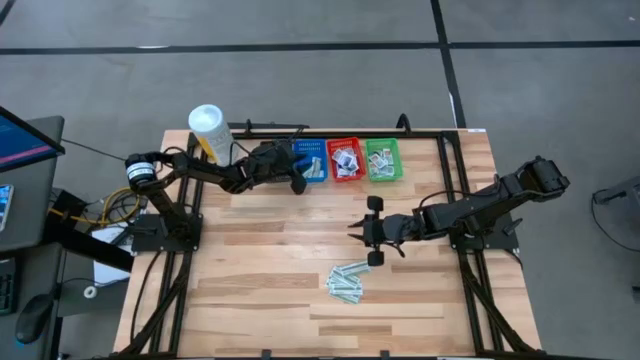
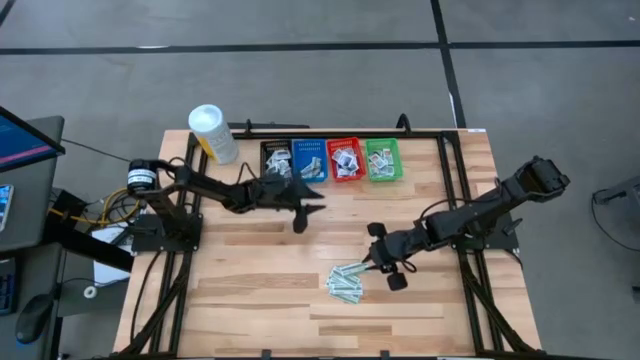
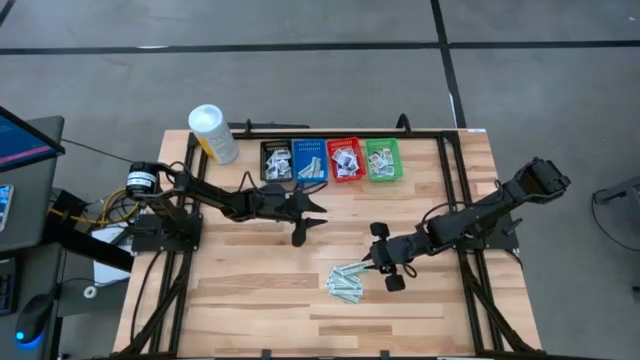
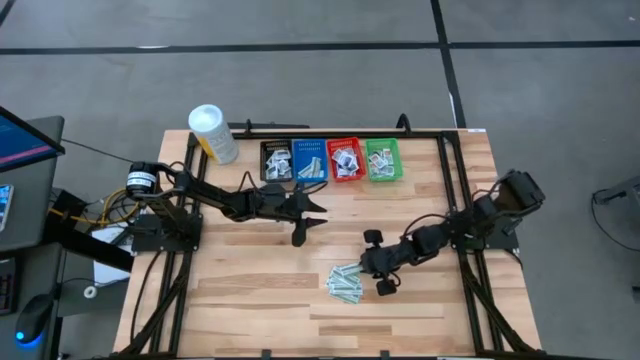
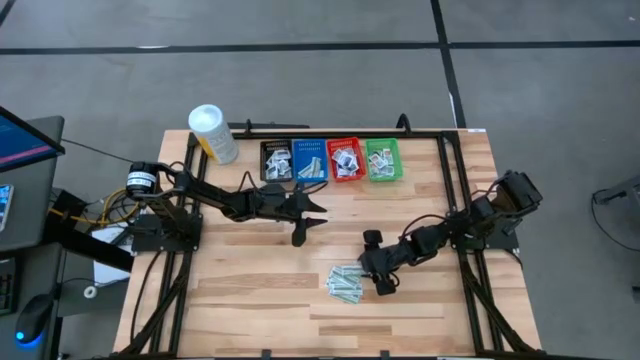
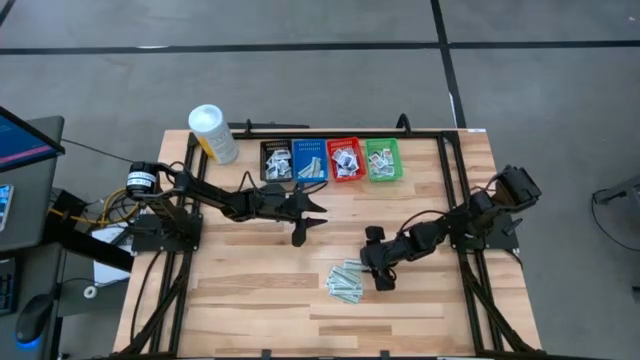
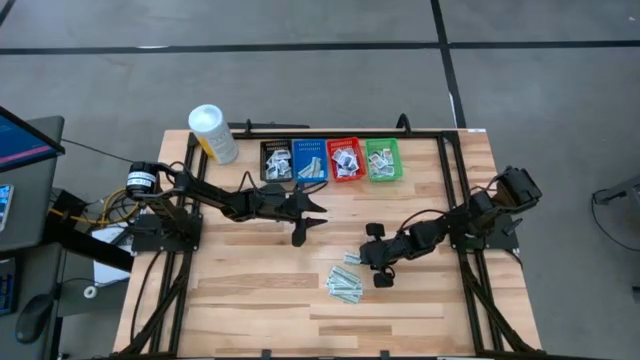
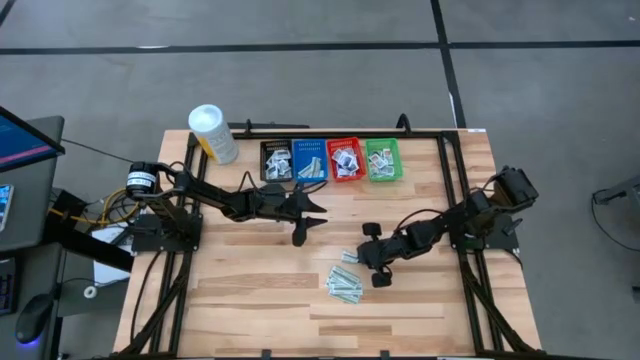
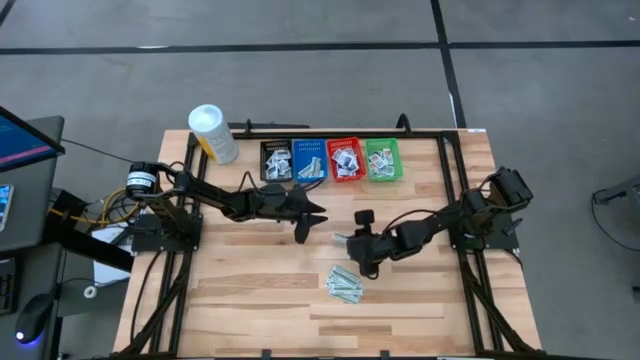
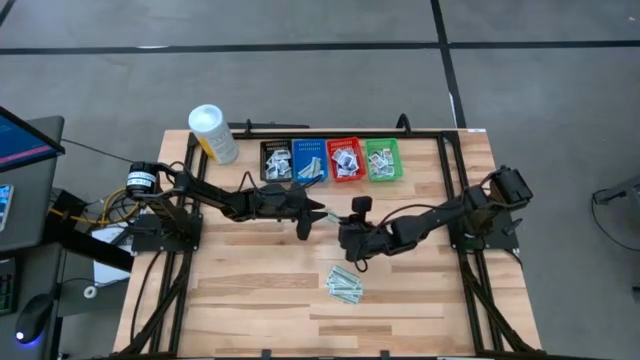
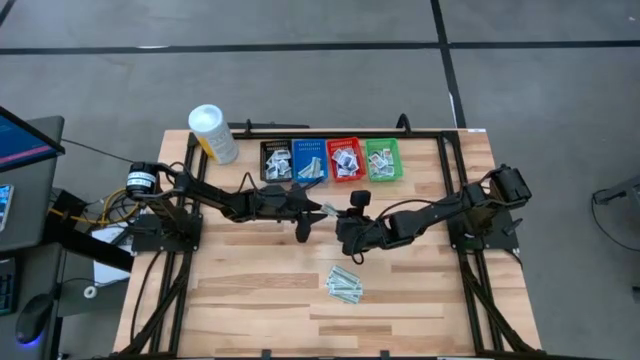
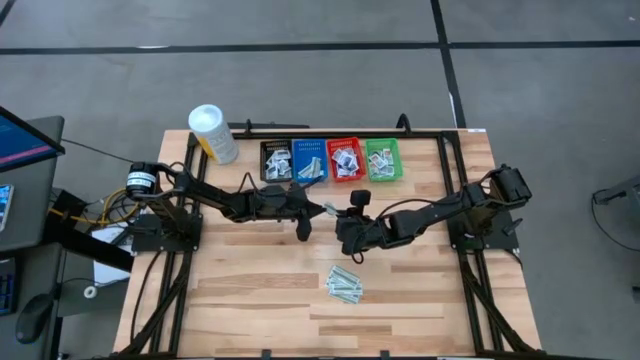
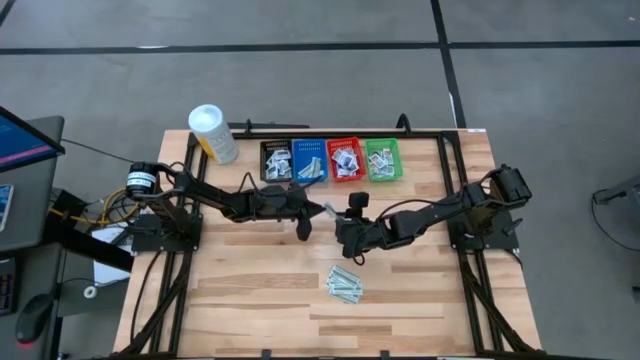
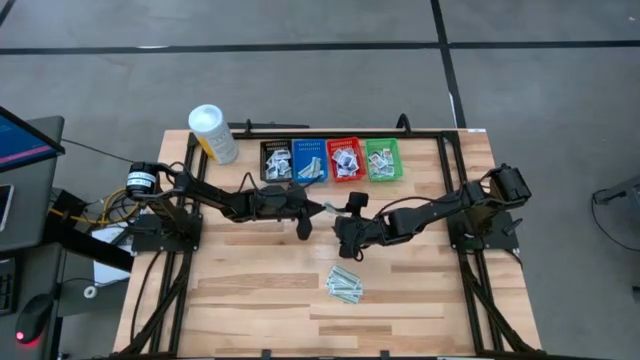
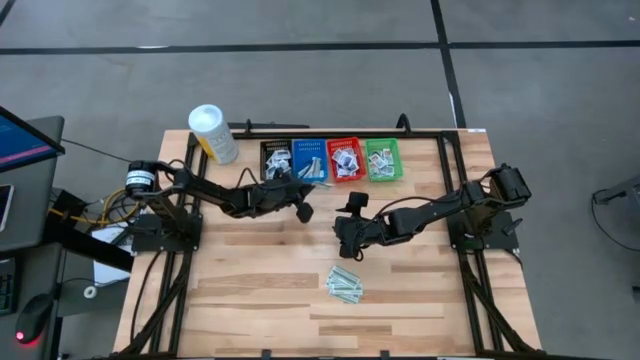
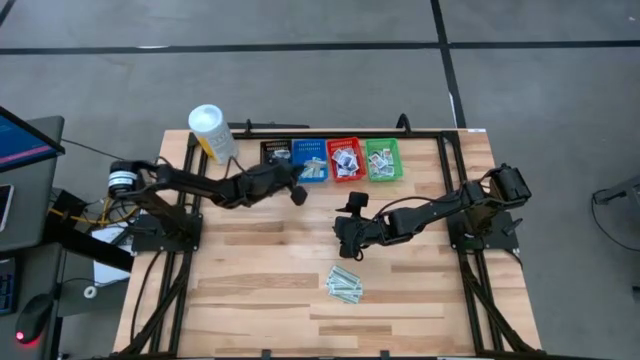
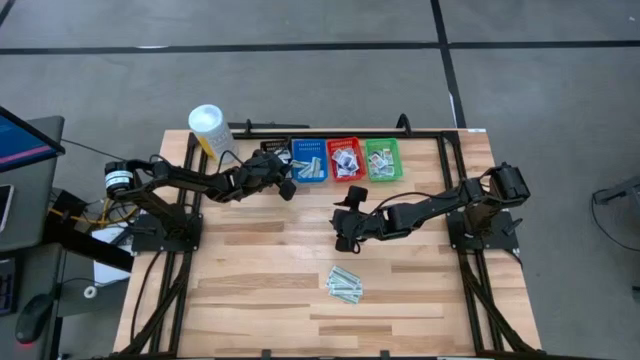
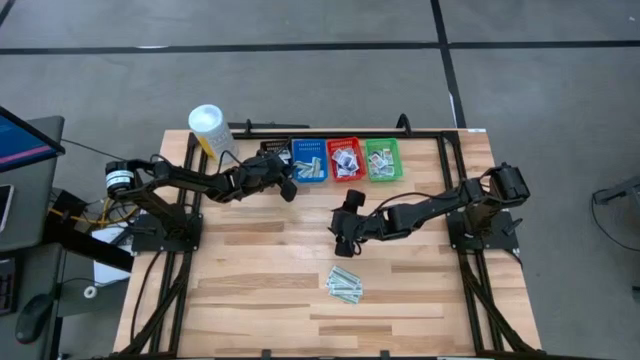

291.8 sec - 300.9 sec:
Task: Pick & Place First Aid Supplies
Put the green pad into the blue bin

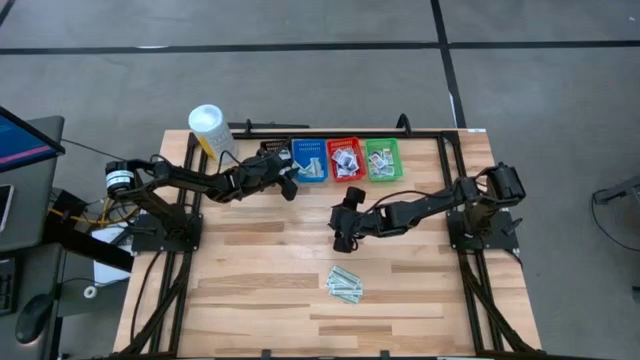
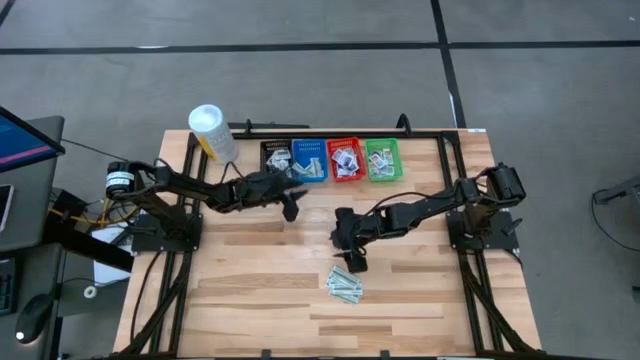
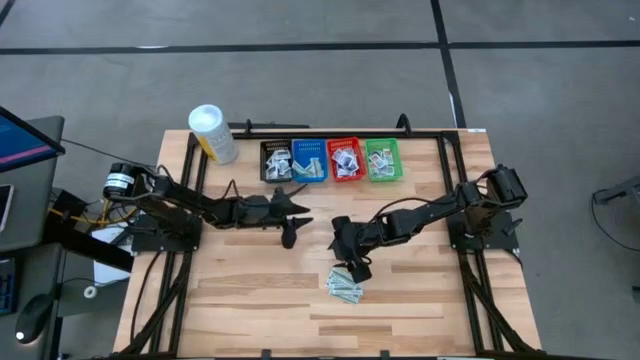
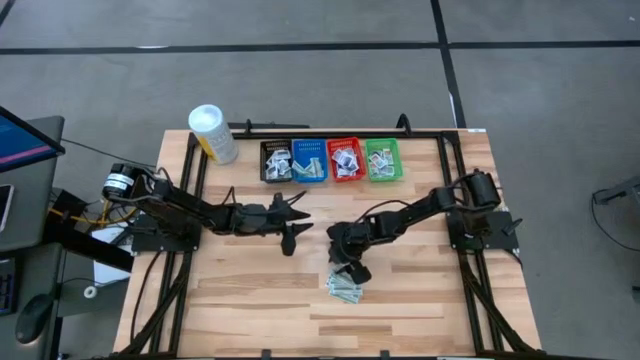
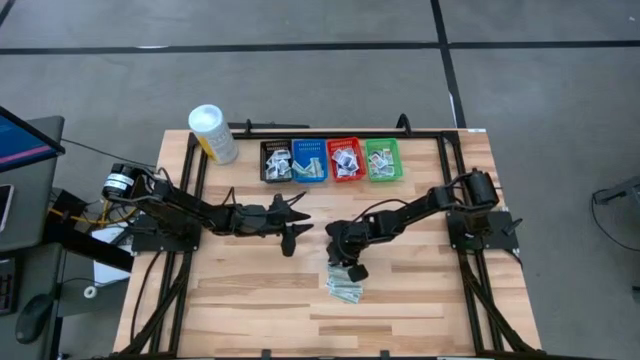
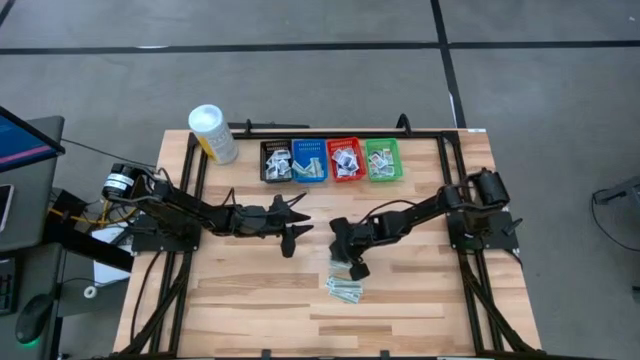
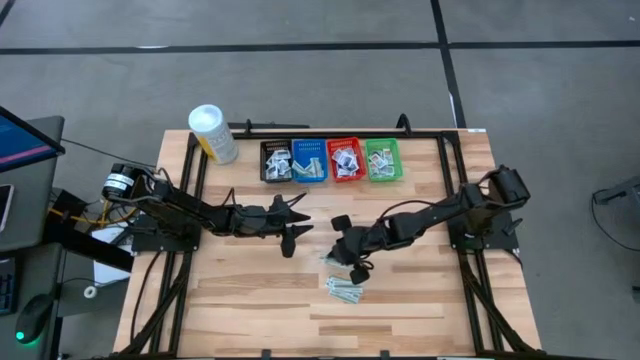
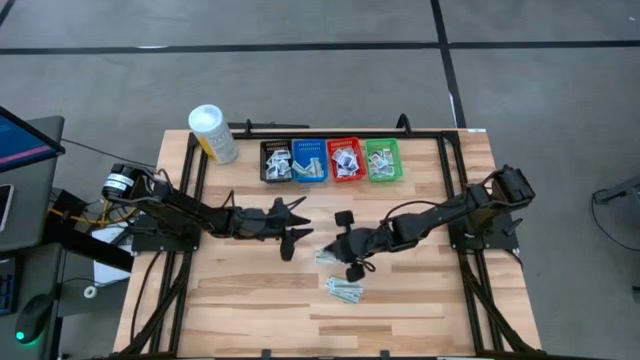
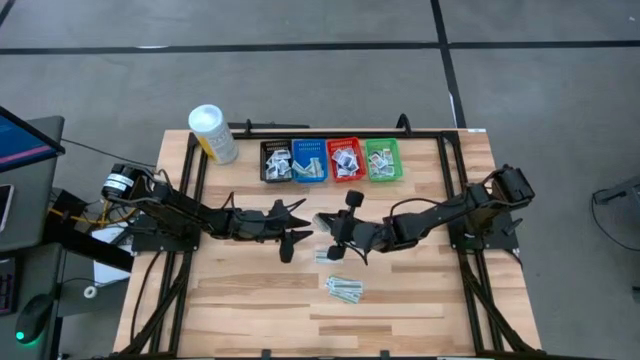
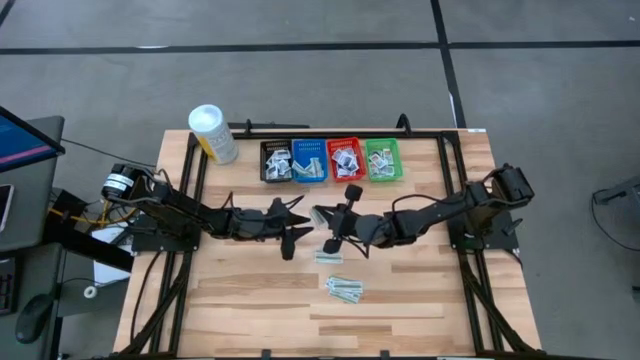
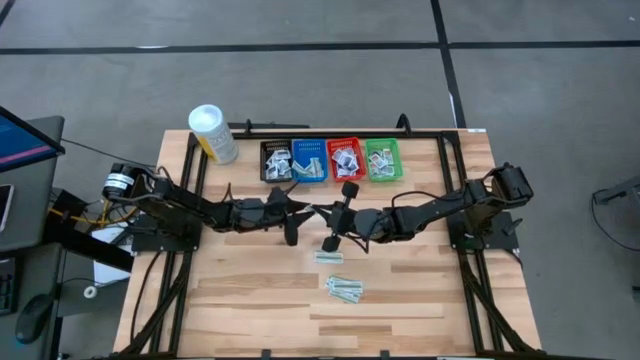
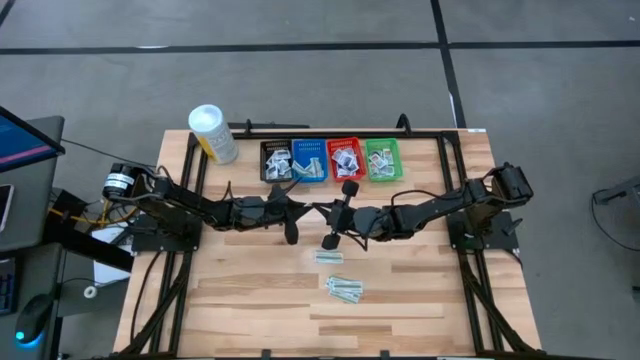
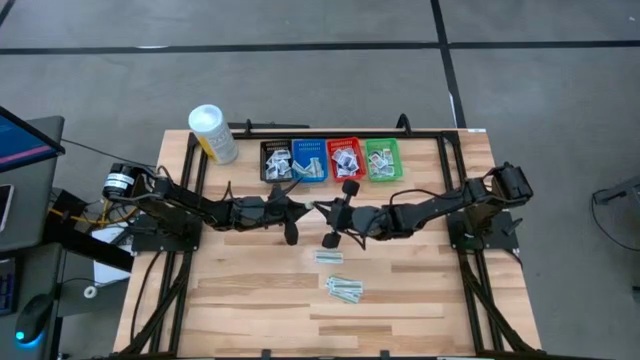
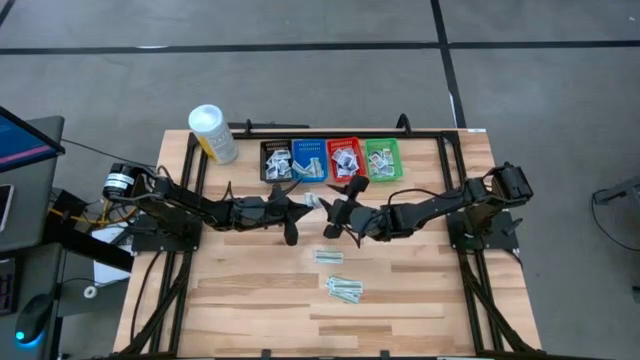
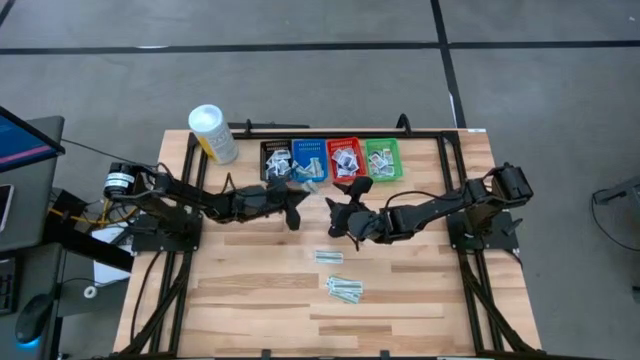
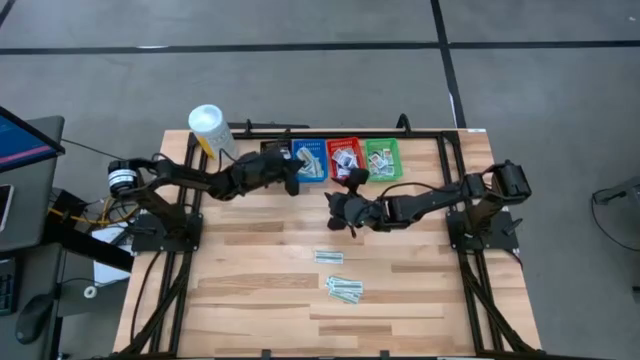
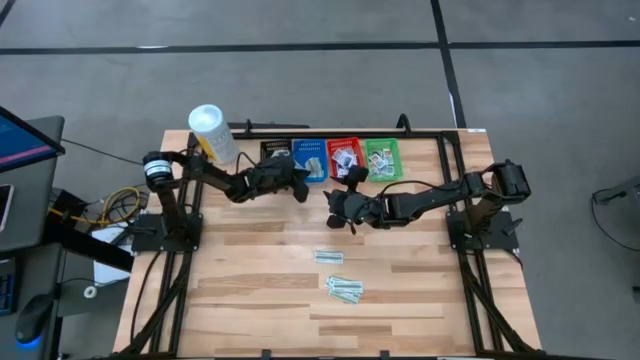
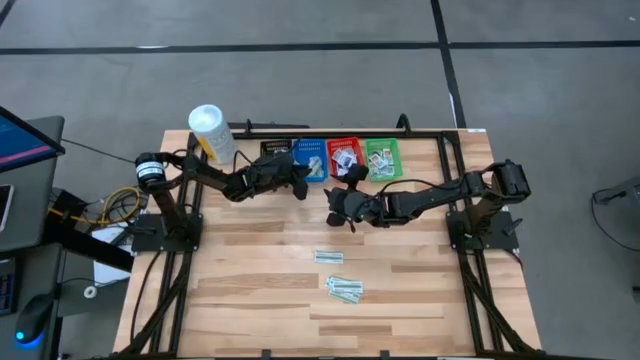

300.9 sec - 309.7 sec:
Put the green pad into the blue bin
